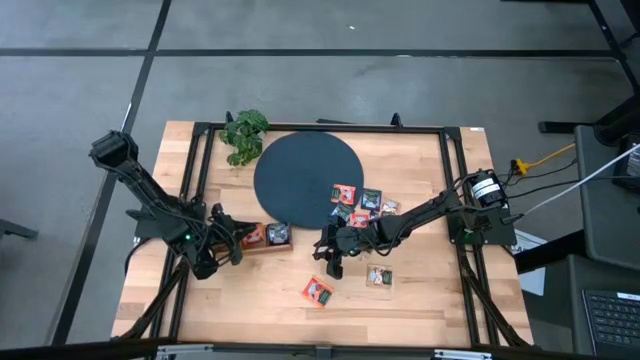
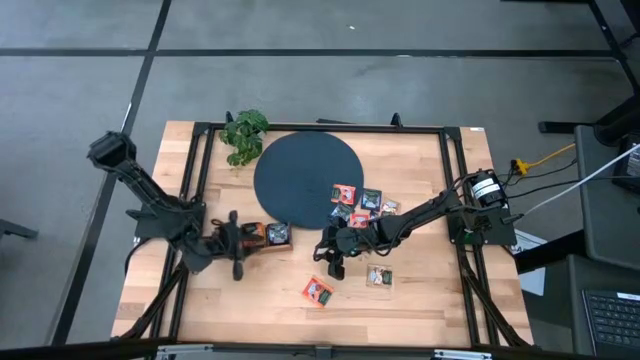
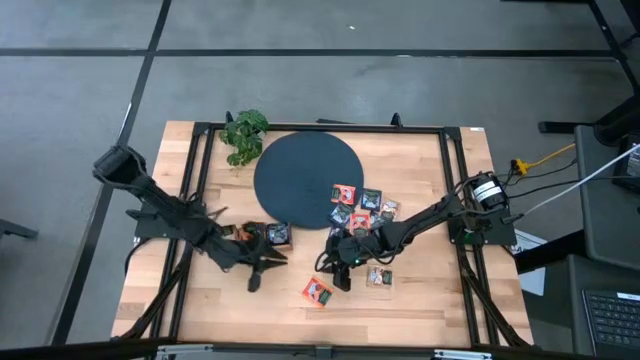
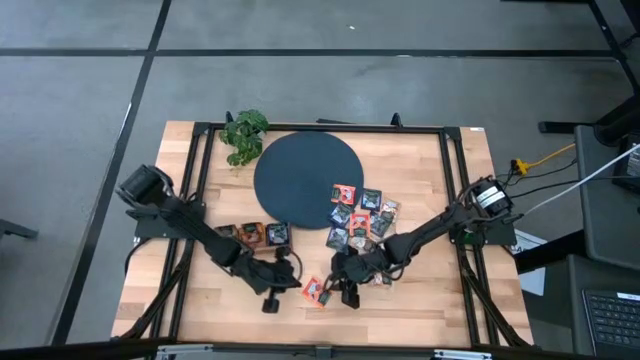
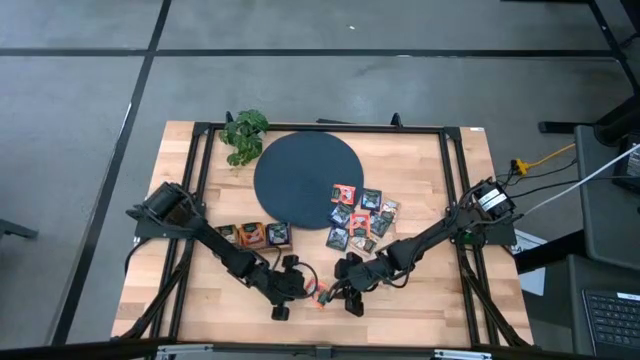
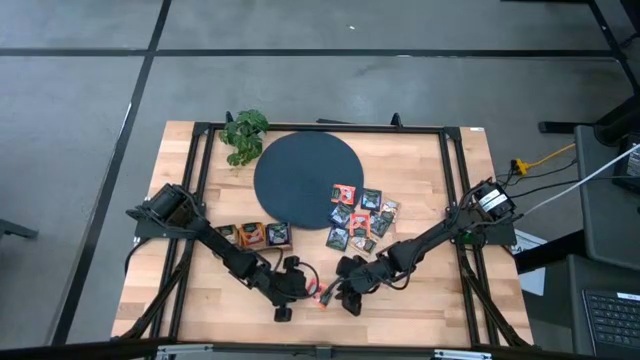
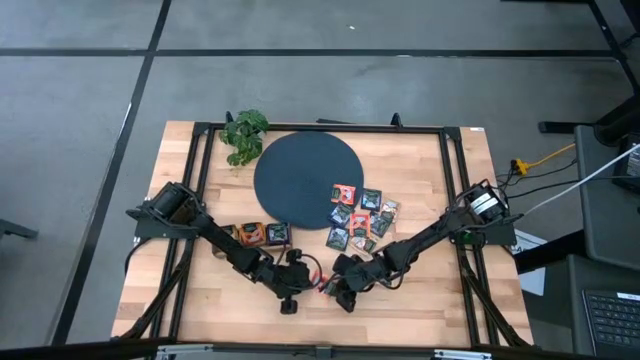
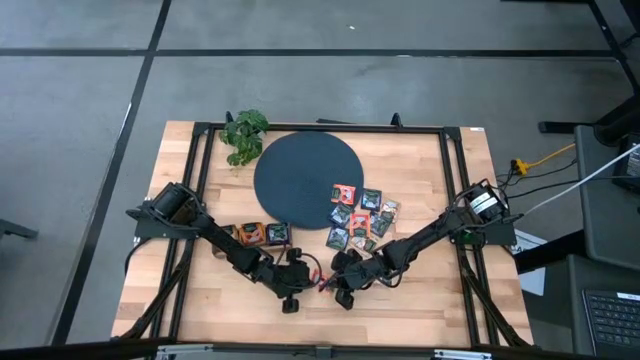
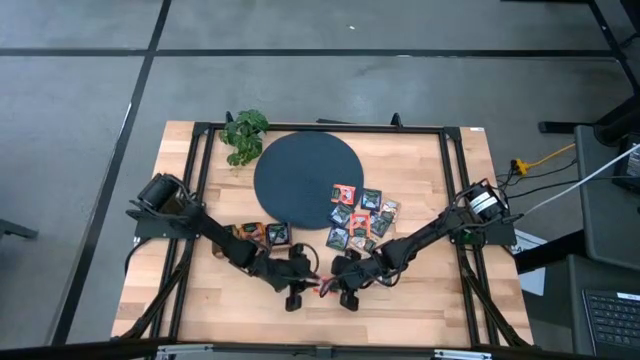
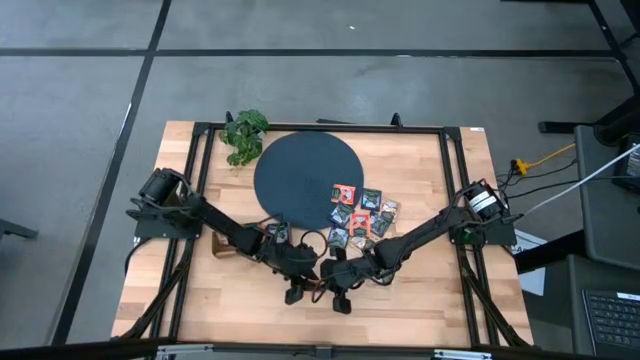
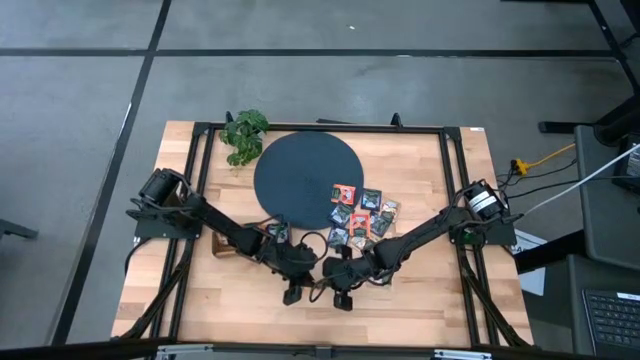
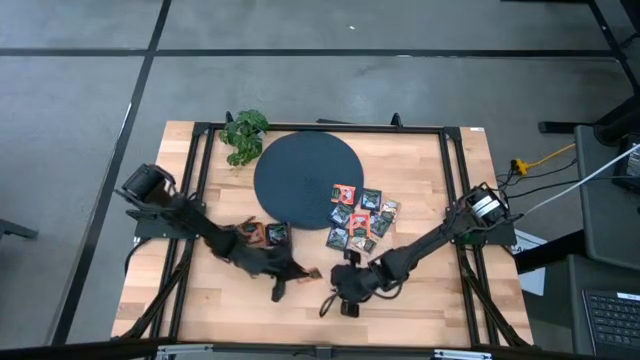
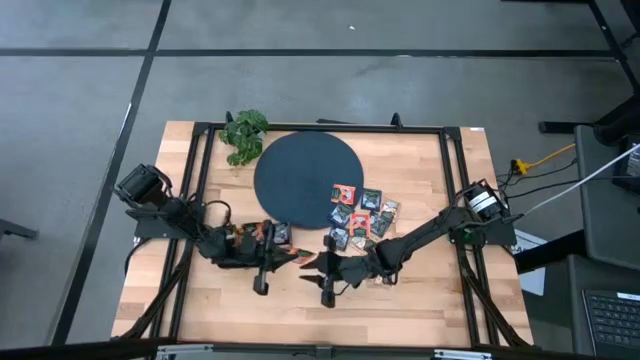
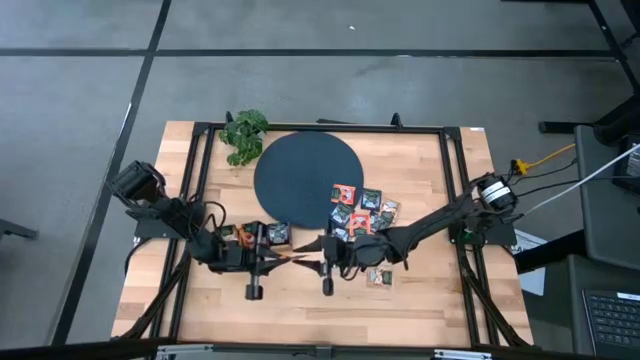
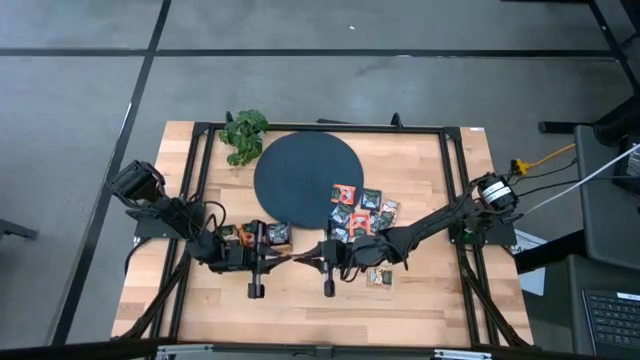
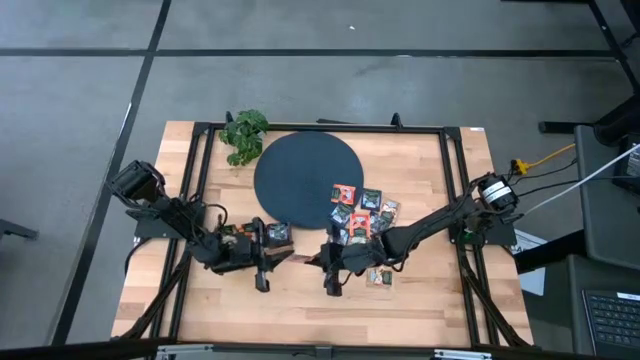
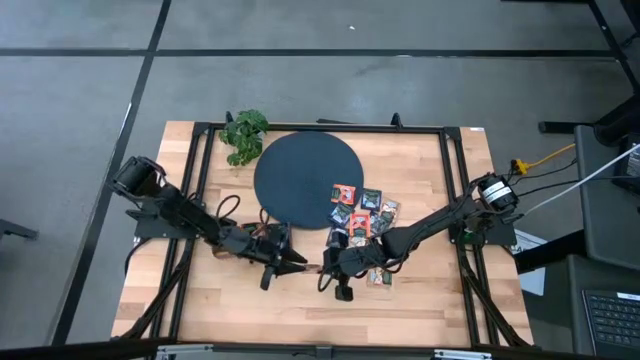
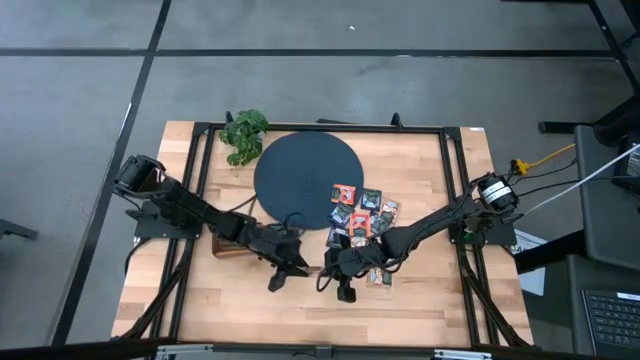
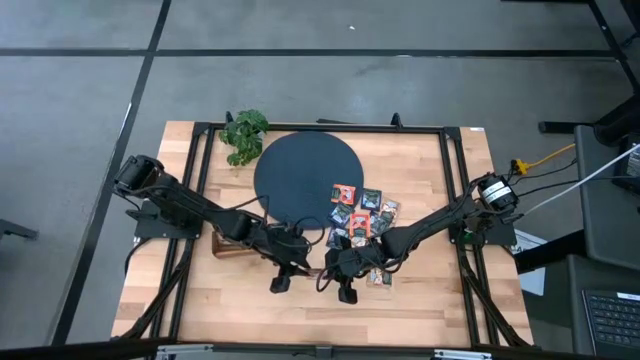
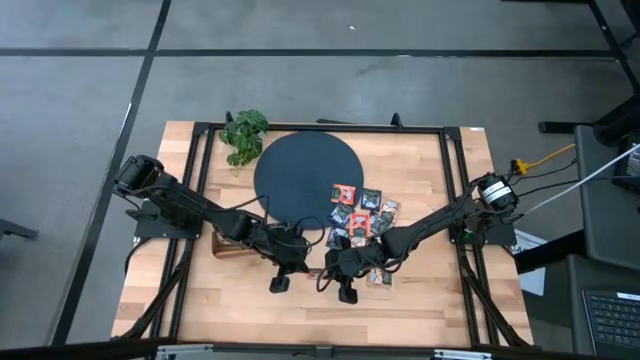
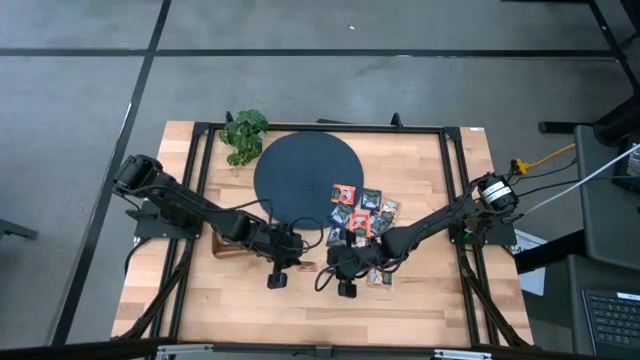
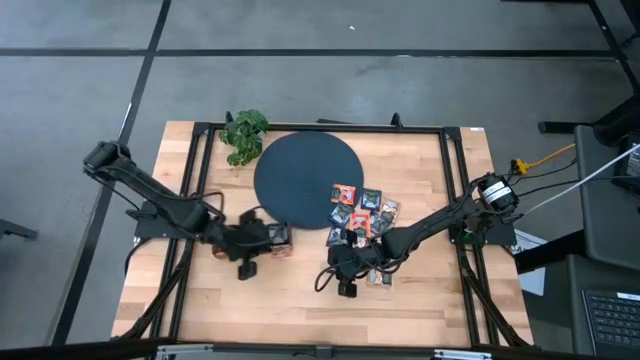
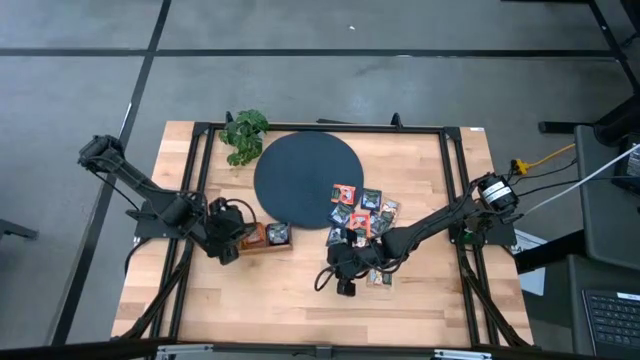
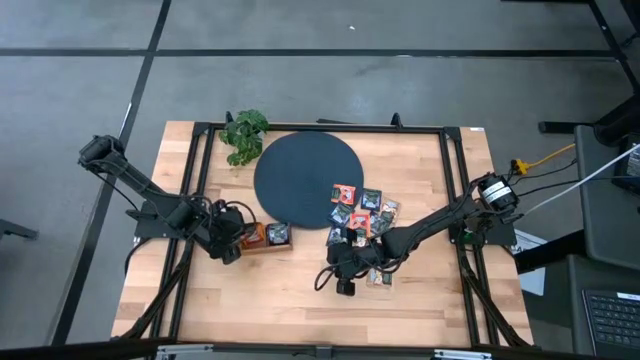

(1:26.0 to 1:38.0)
Task: Pick & Place Tea
Put the orange tea bag into the middle section of the wooden organizer

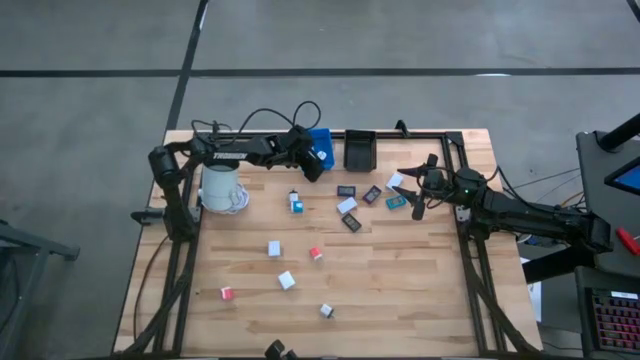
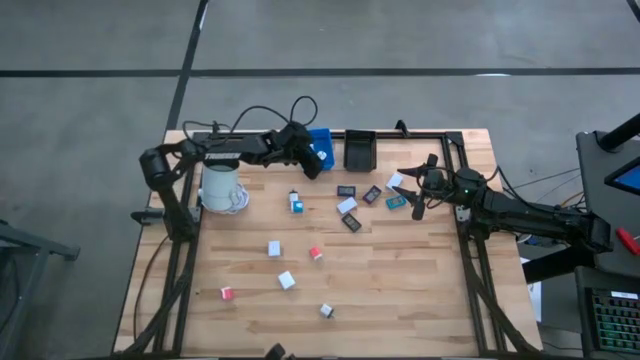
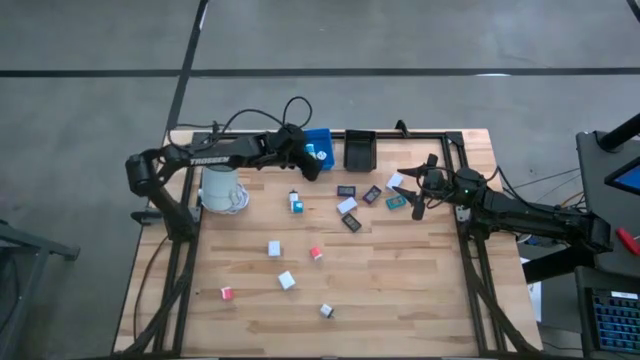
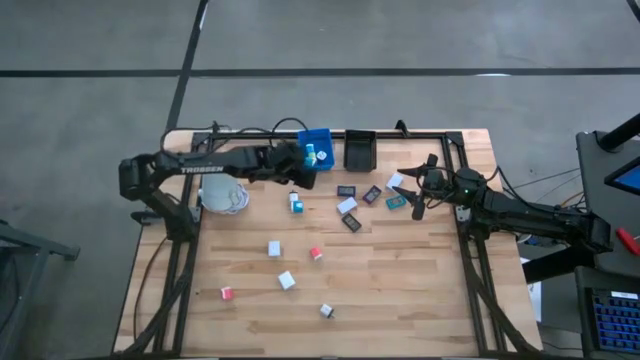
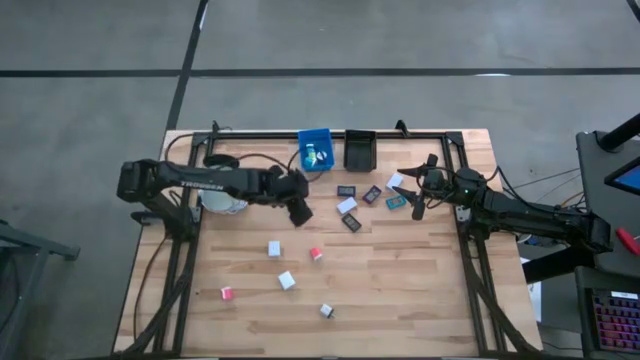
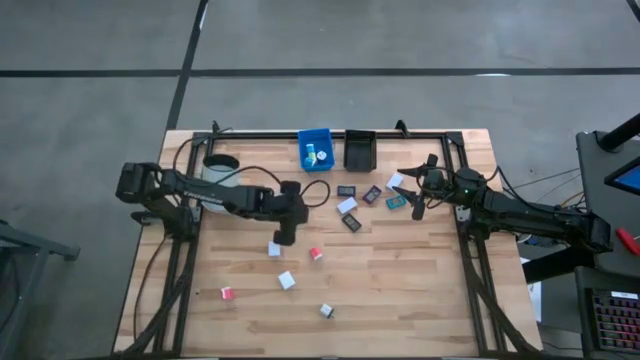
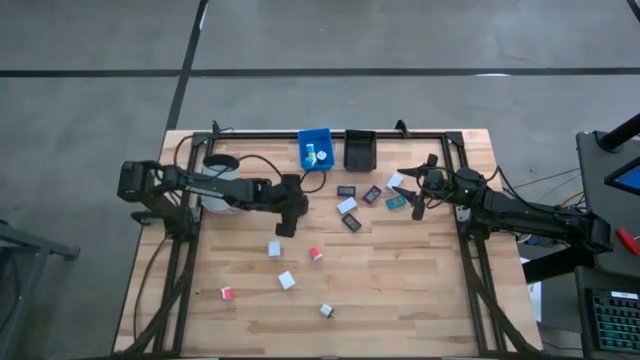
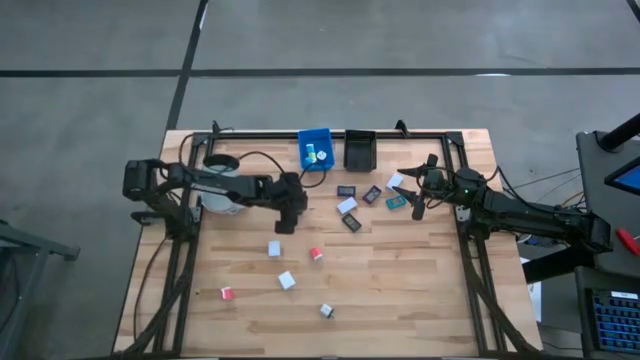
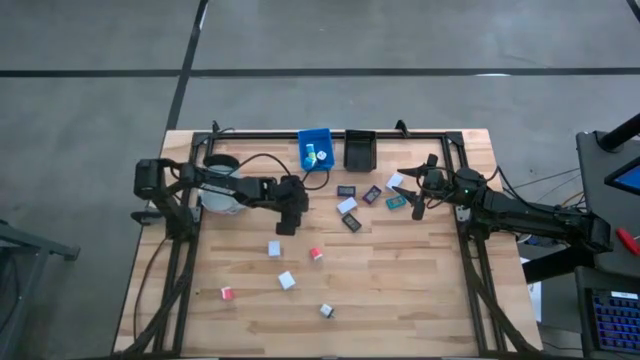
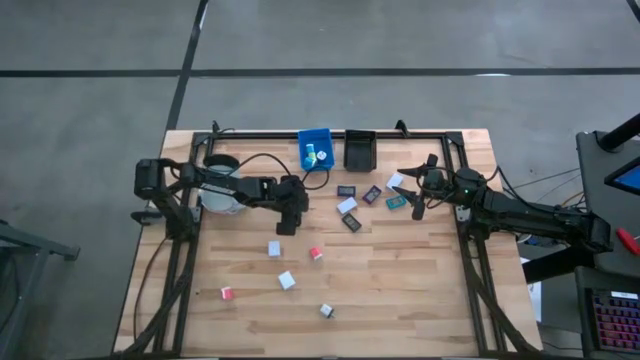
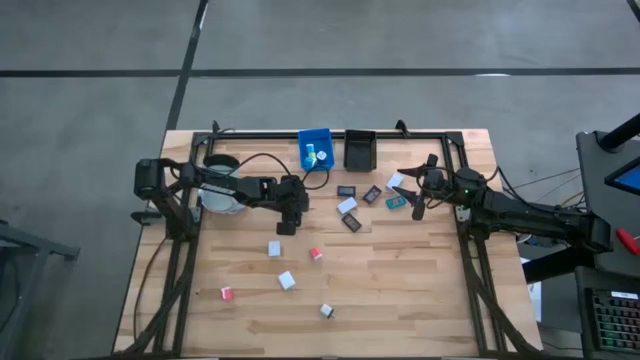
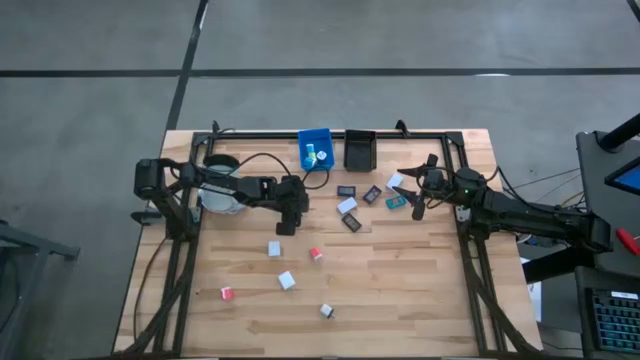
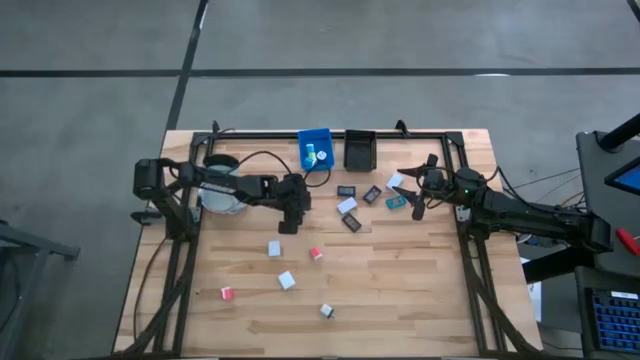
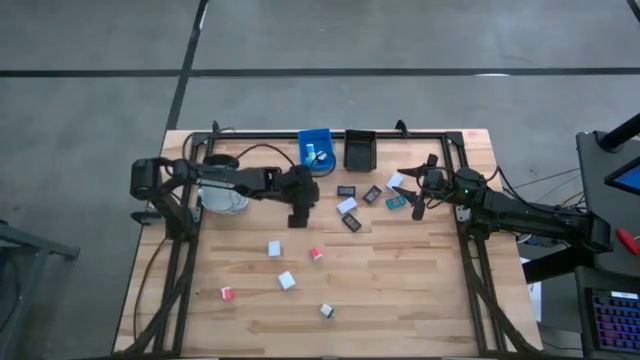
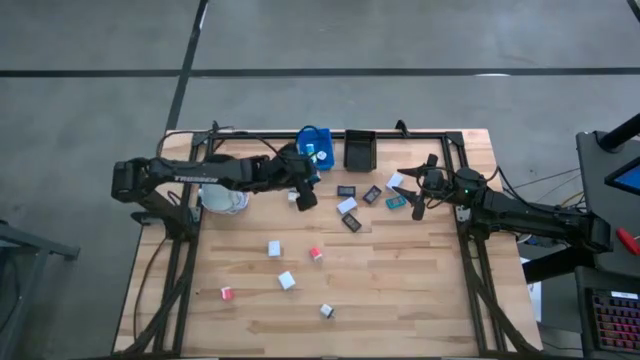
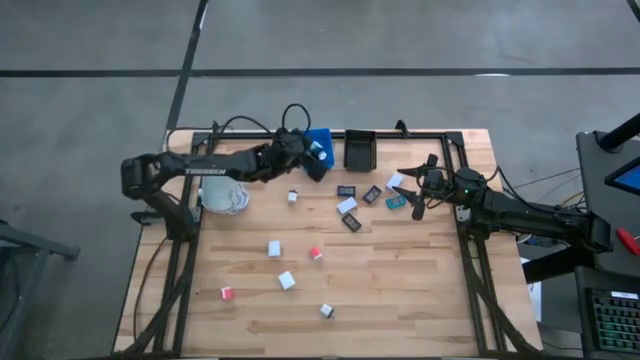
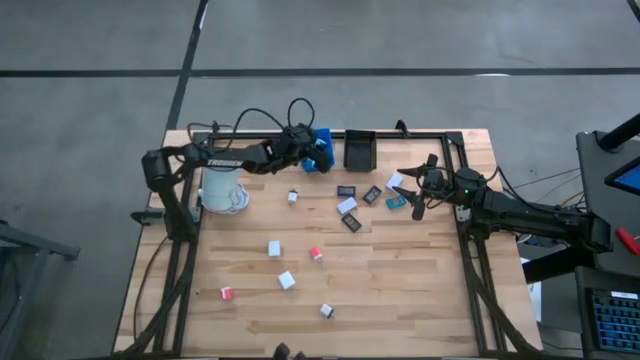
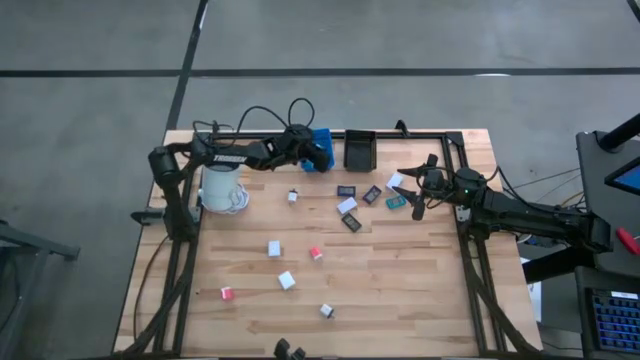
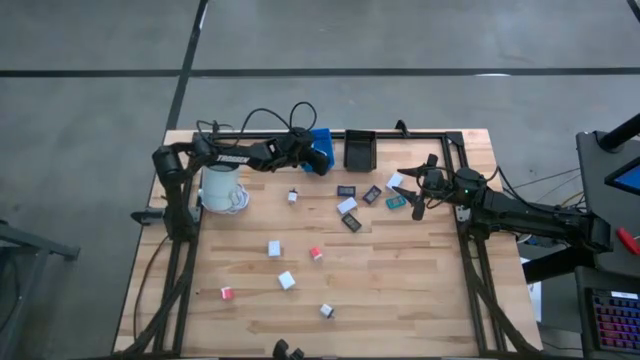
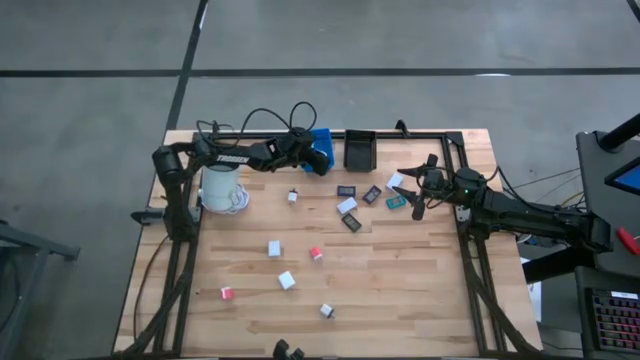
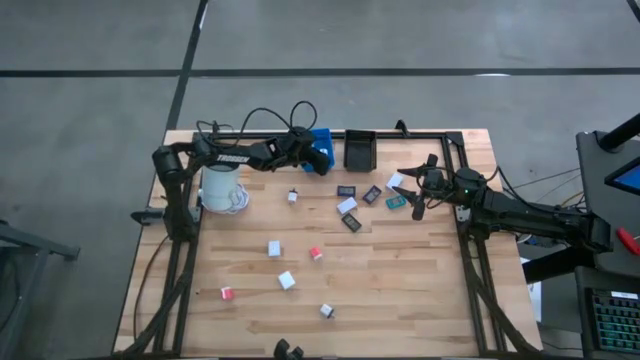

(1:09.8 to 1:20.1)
Task: Pick & Place Office items
Put the big blue adapter into the blue basket
